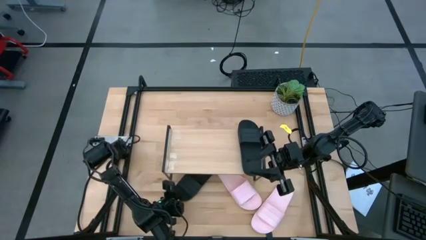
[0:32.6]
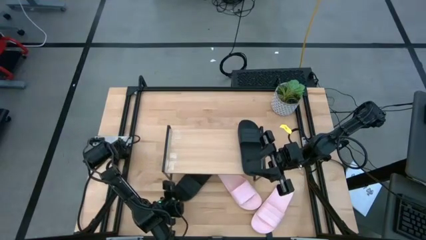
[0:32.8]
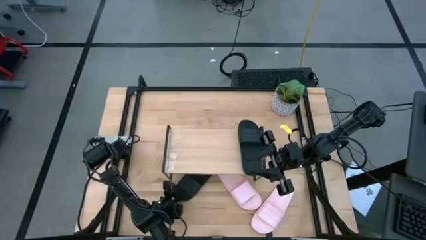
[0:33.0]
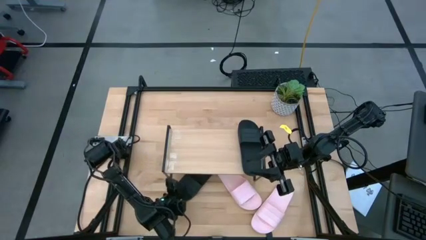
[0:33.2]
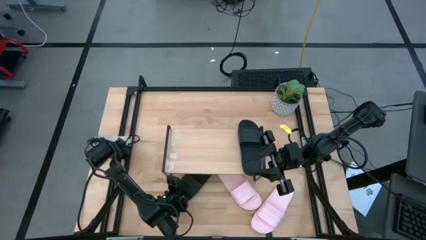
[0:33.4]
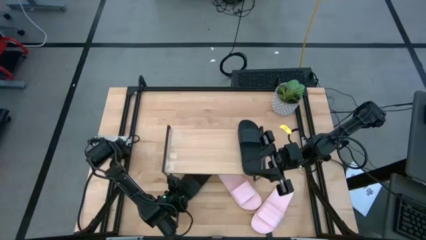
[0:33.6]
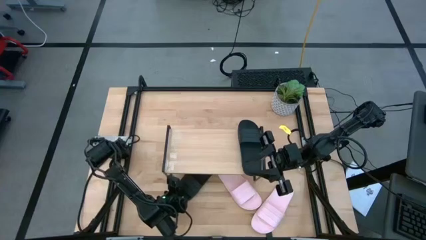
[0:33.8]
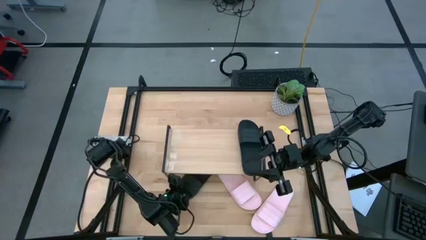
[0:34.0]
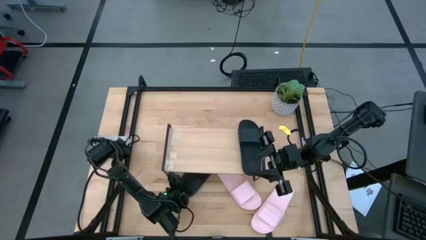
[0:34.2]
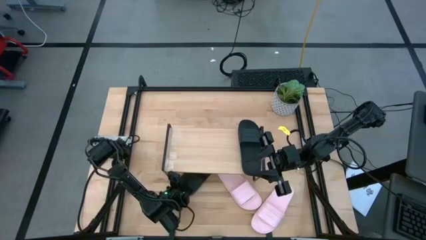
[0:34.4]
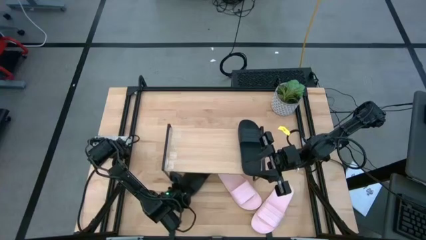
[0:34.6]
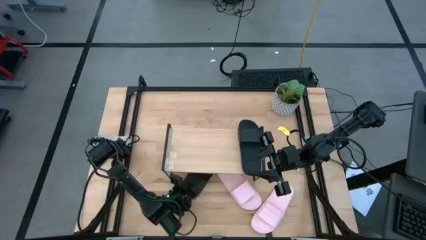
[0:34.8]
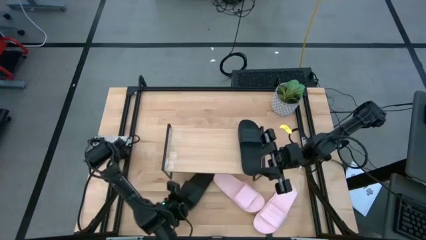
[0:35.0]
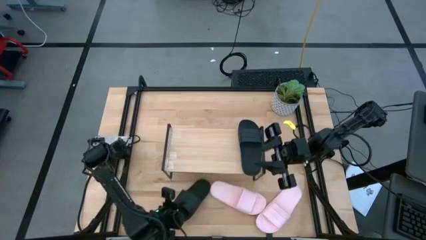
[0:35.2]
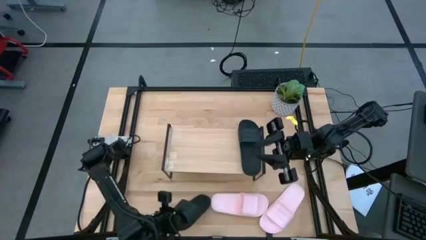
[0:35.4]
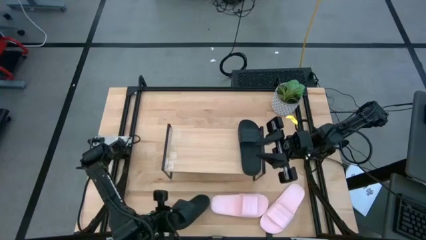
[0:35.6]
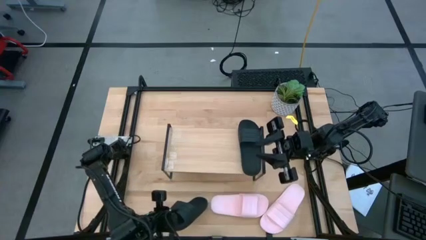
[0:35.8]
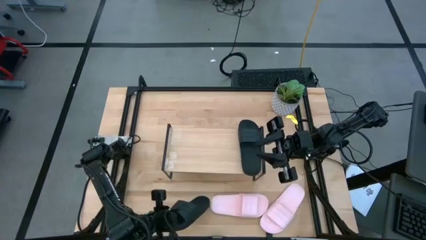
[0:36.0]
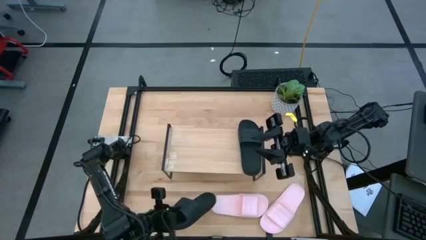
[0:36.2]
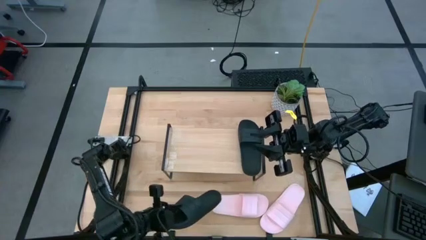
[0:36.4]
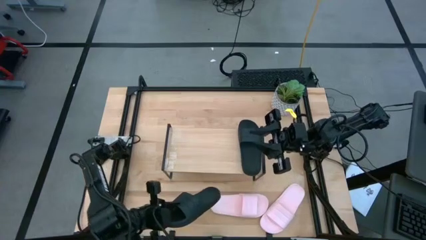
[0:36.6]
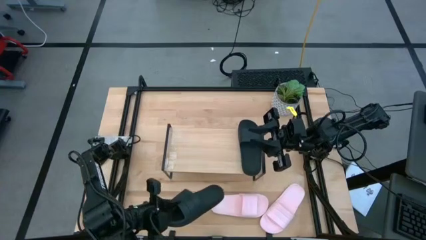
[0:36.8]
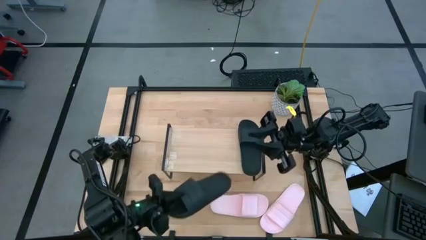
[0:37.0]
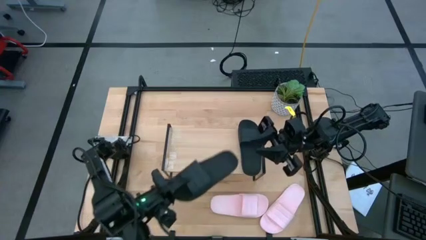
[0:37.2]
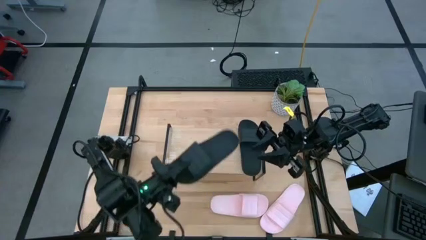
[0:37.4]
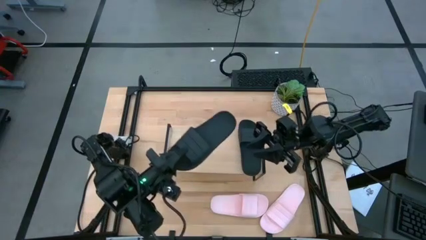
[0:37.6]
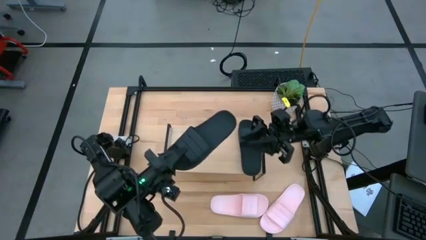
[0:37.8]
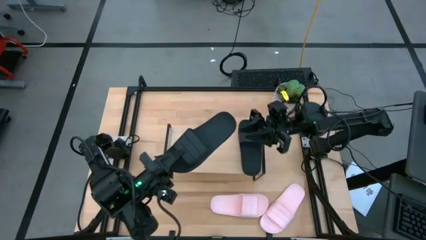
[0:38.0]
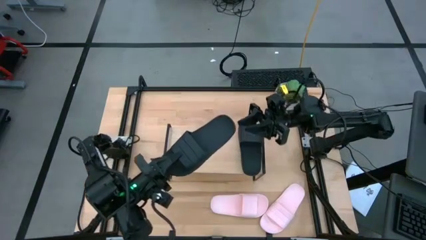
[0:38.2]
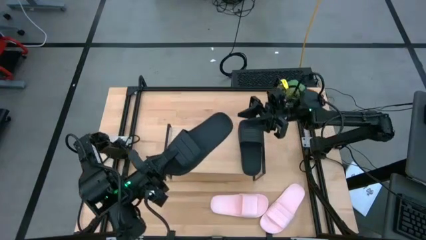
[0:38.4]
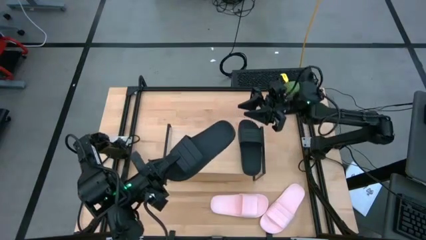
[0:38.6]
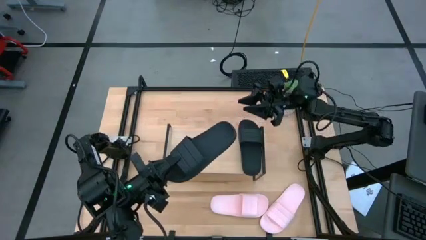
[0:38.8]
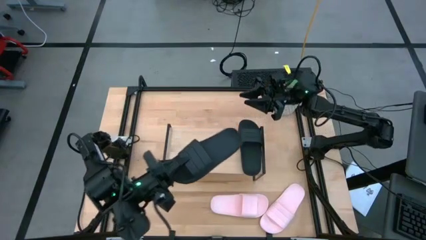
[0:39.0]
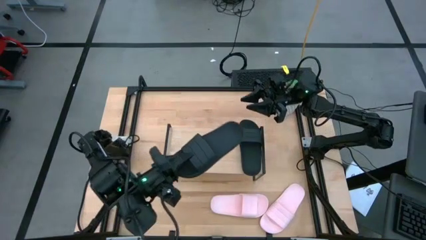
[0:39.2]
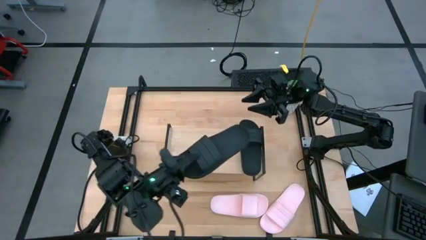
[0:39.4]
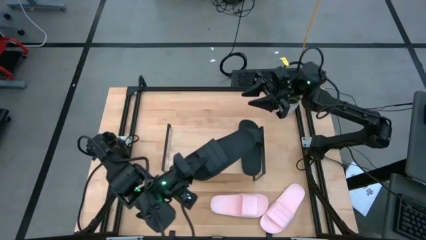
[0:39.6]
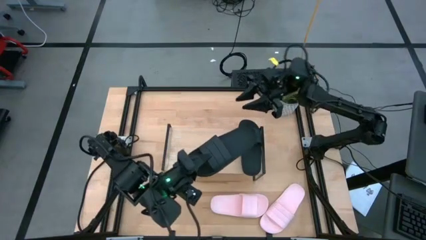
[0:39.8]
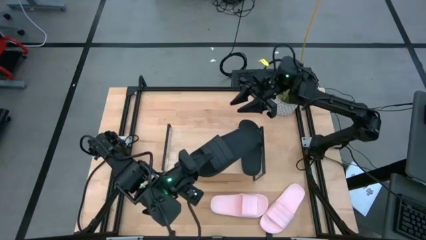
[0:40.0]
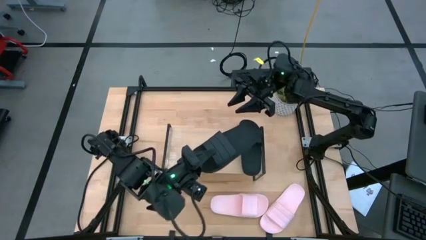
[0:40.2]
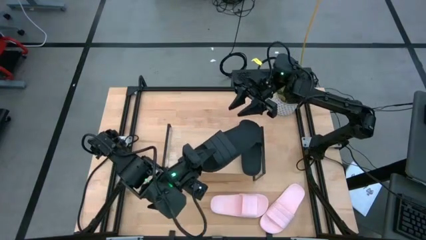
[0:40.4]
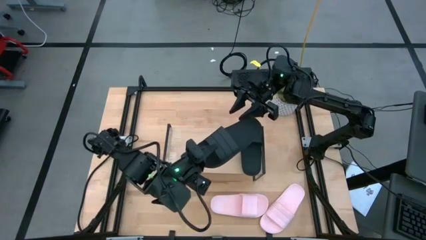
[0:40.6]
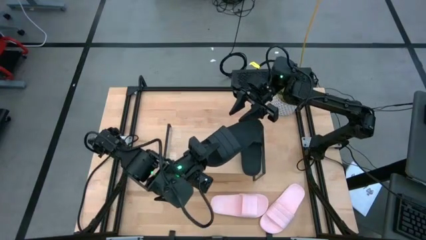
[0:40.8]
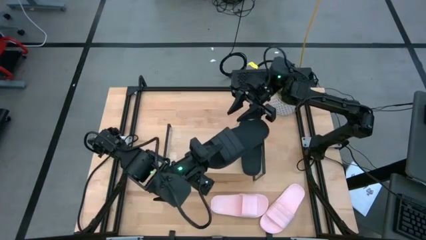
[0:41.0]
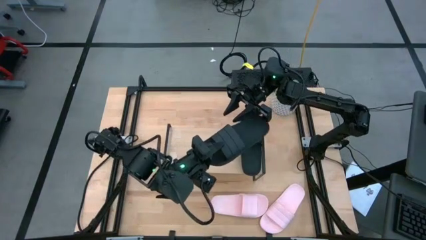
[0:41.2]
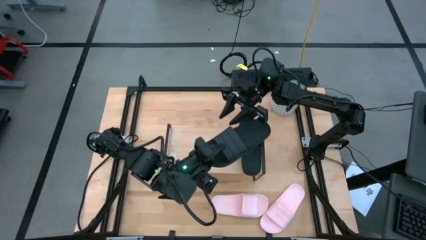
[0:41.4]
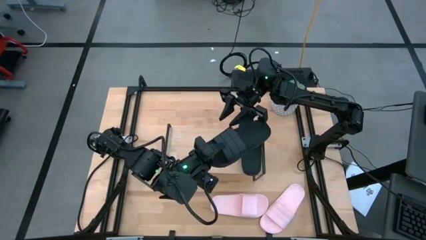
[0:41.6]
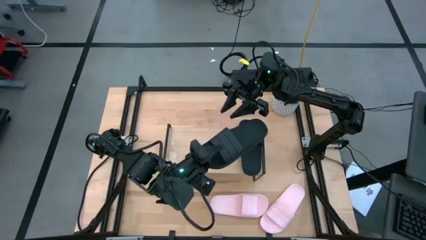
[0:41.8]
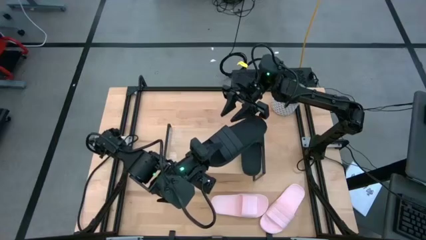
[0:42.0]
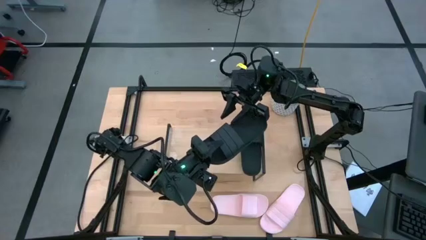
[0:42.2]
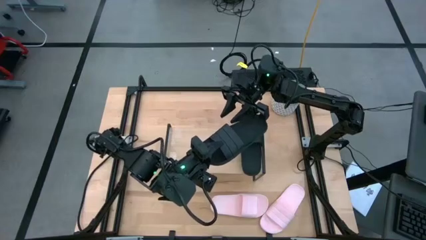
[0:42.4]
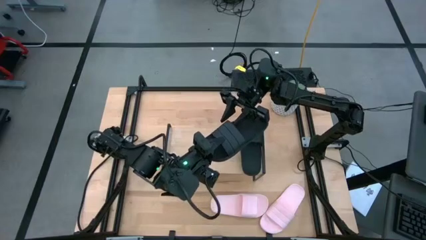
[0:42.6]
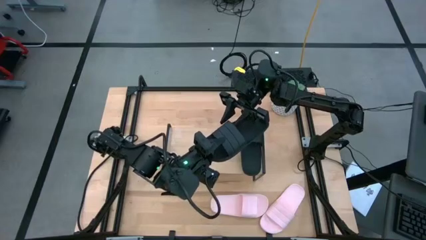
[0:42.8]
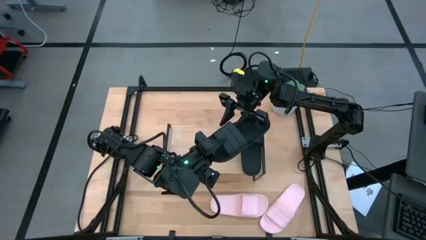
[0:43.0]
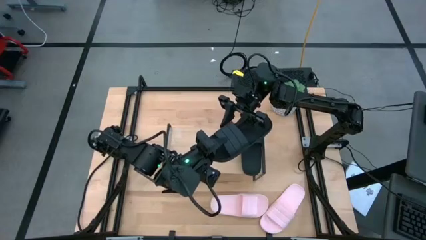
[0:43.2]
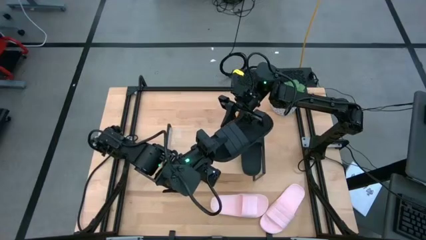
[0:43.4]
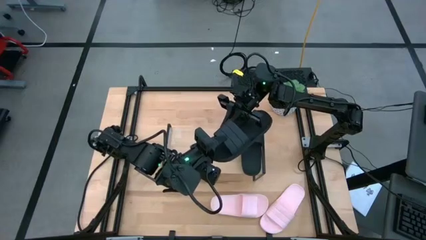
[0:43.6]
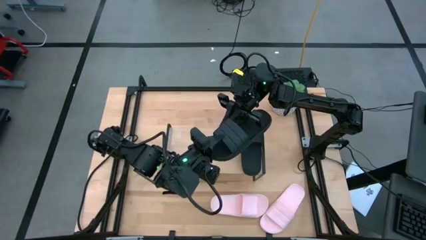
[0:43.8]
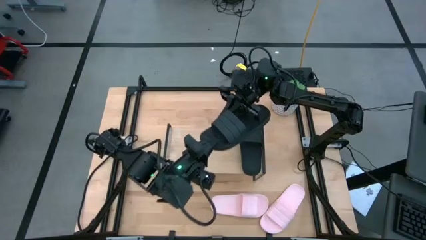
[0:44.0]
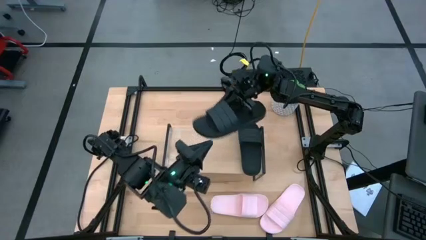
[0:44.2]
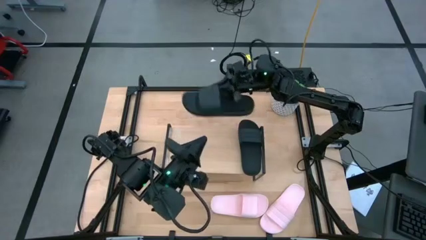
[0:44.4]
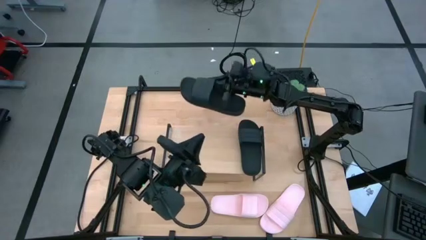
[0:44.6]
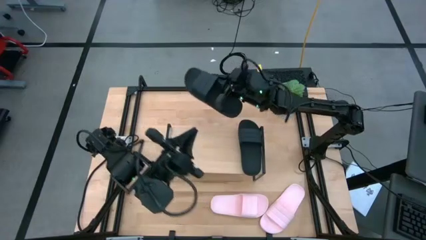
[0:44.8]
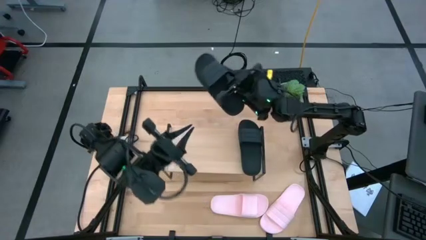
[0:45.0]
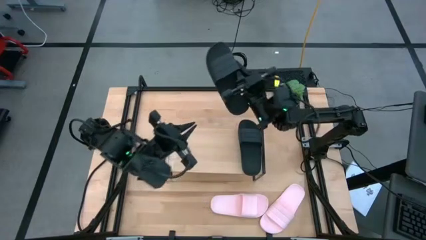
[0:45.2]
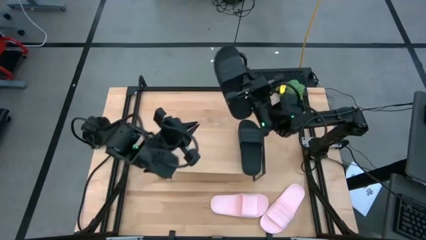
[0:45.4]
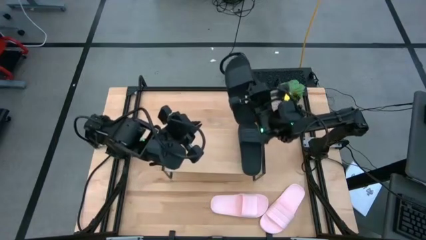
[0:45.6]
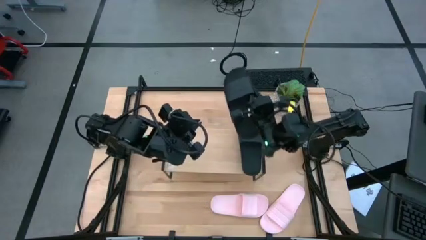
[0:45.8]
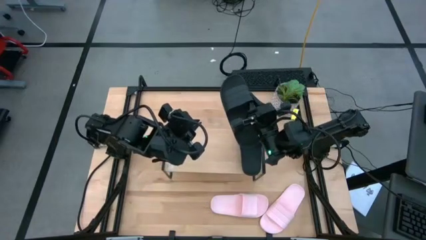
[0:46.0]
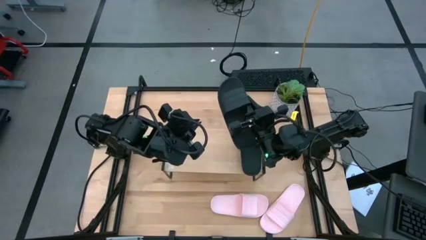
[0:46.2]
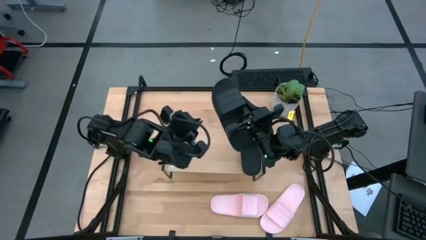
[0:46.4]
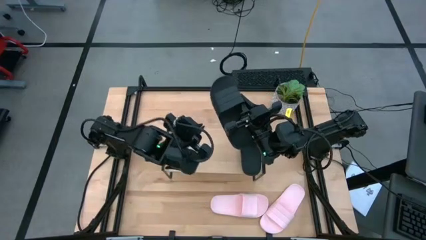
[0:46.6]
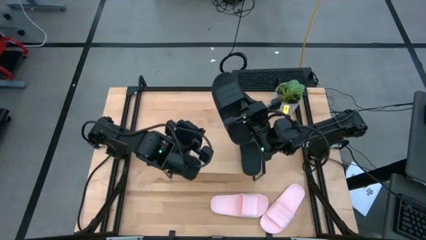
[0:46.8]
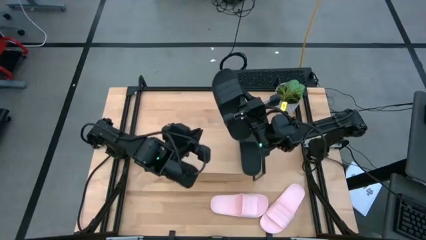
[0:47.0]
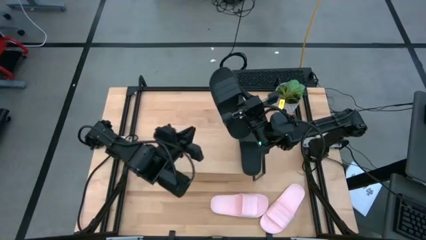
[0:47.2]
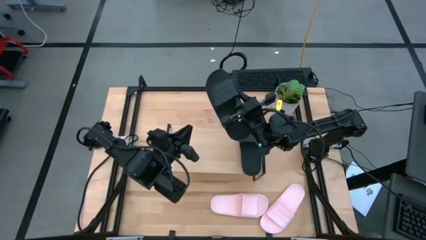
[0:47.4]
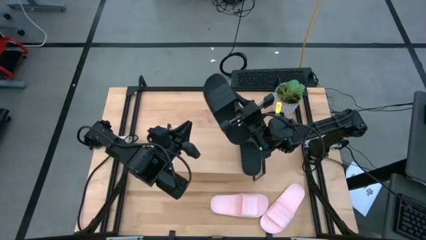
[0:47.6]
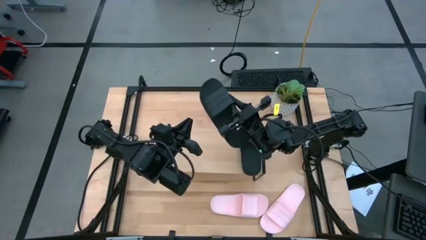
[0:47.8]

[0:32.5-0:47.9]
Task: Pick and place slides into the shelf
Put the black slipper on the shelf
